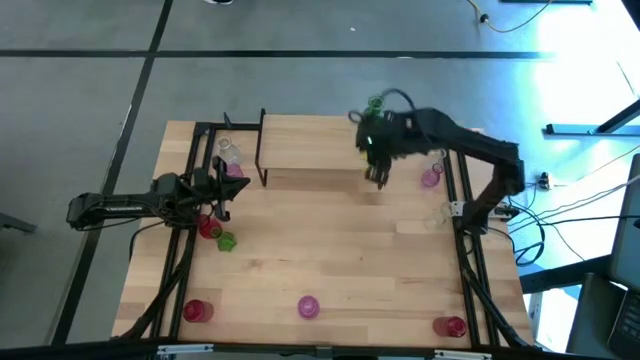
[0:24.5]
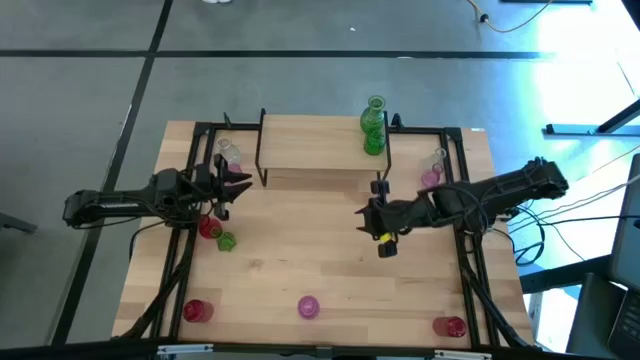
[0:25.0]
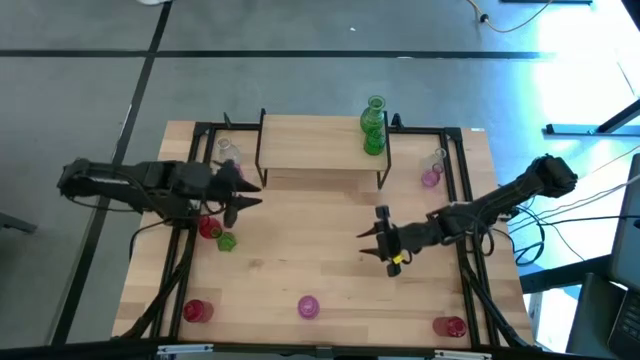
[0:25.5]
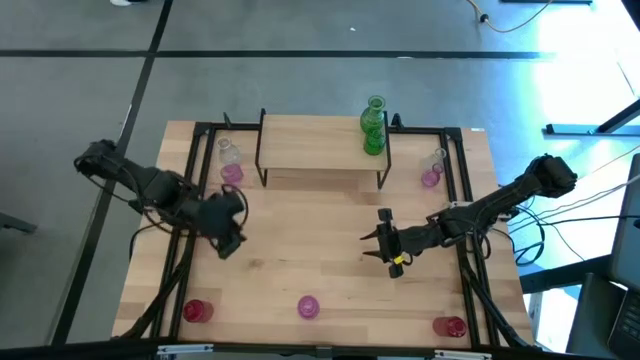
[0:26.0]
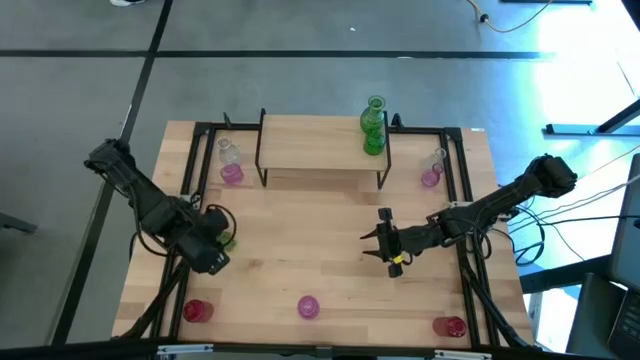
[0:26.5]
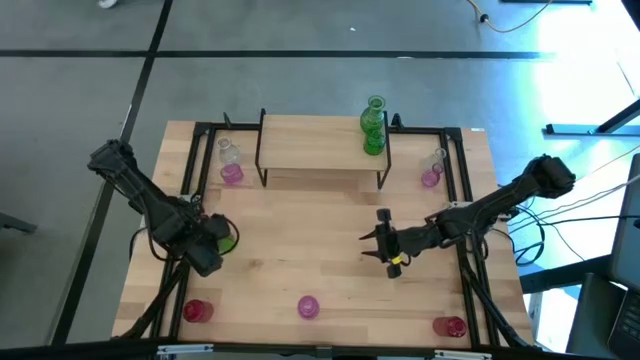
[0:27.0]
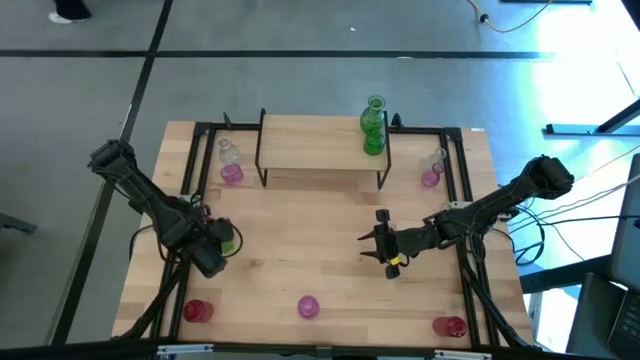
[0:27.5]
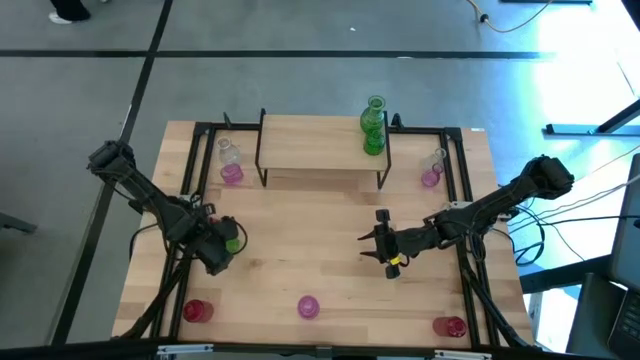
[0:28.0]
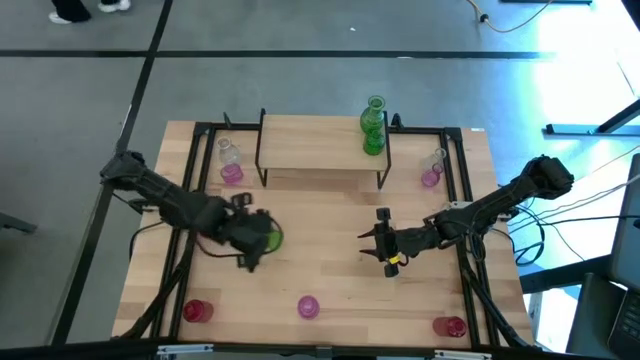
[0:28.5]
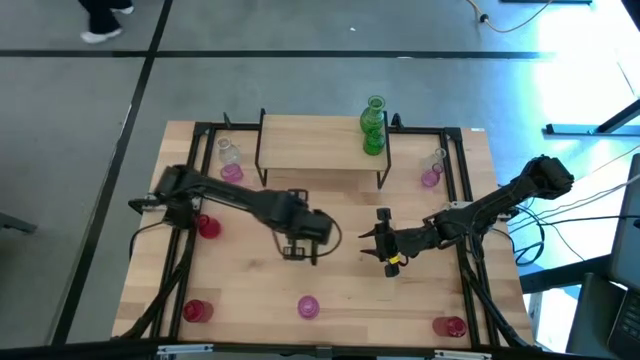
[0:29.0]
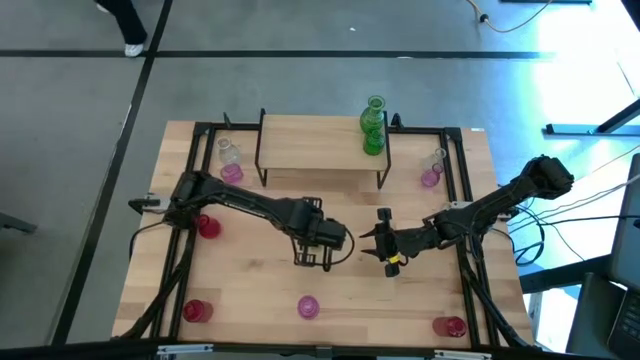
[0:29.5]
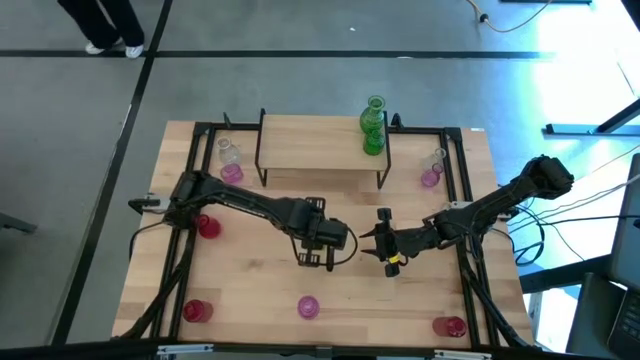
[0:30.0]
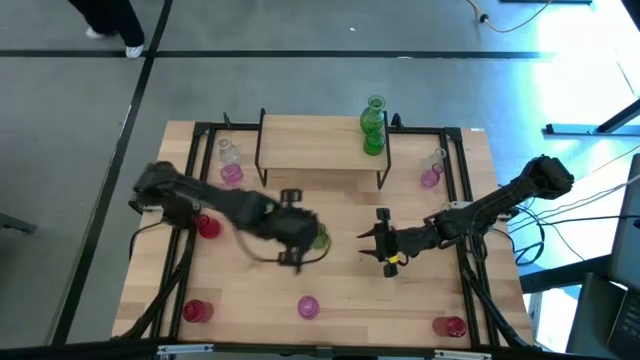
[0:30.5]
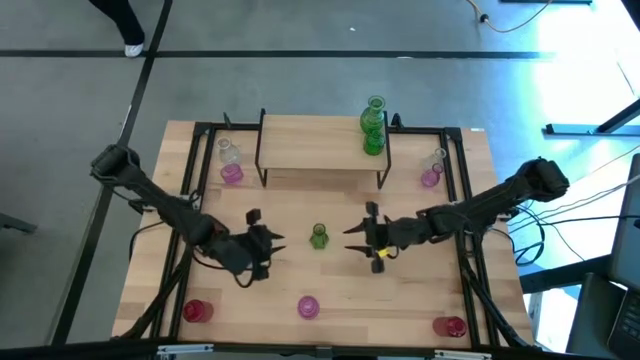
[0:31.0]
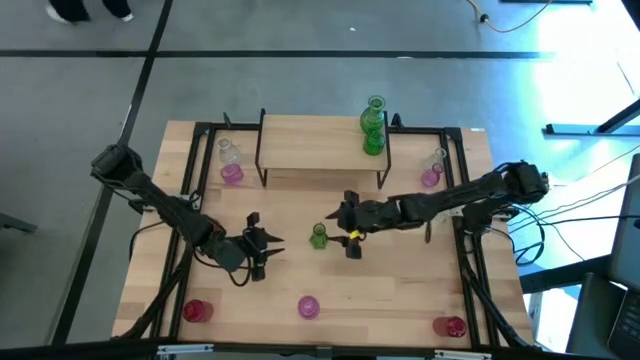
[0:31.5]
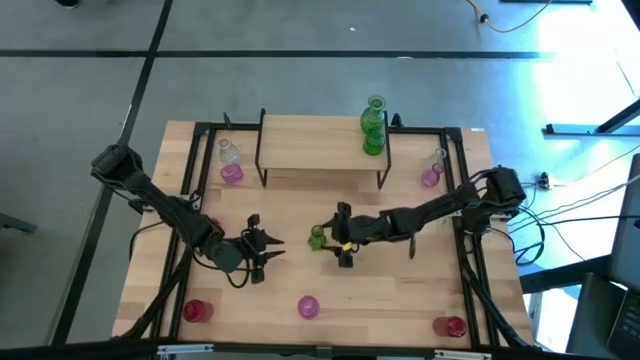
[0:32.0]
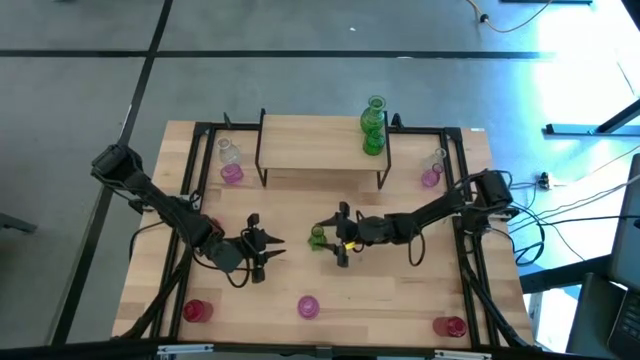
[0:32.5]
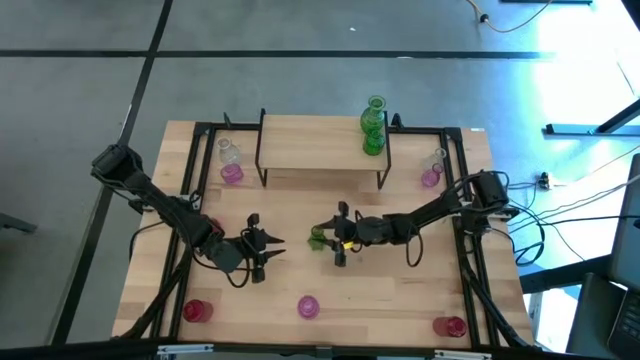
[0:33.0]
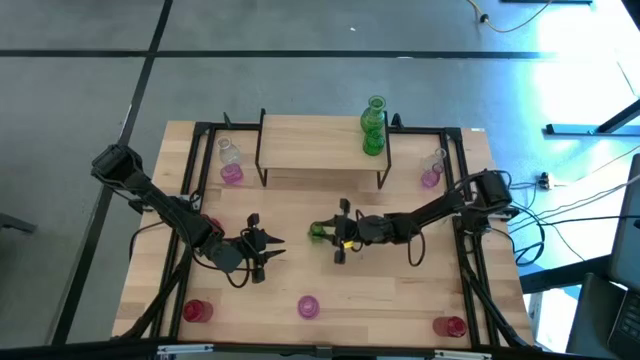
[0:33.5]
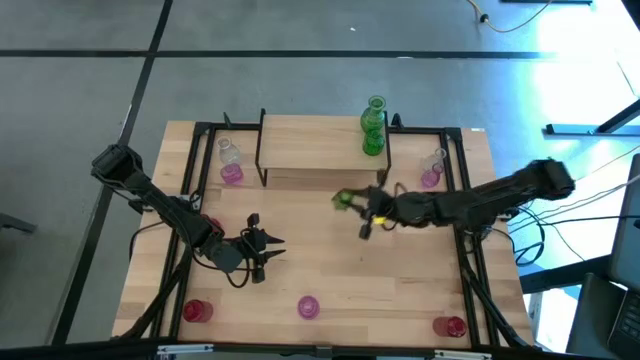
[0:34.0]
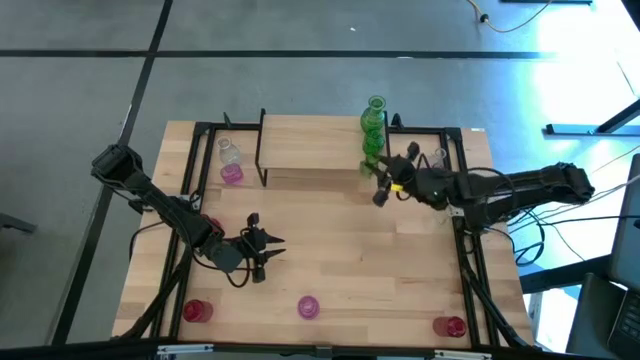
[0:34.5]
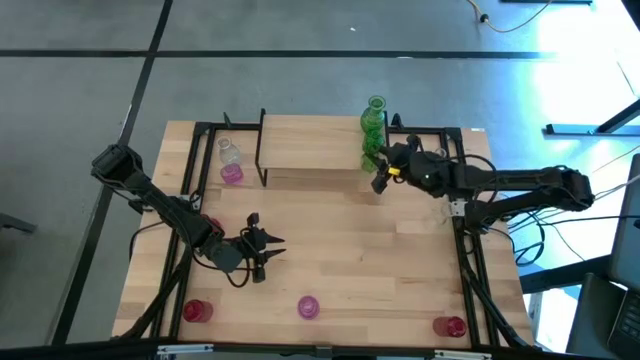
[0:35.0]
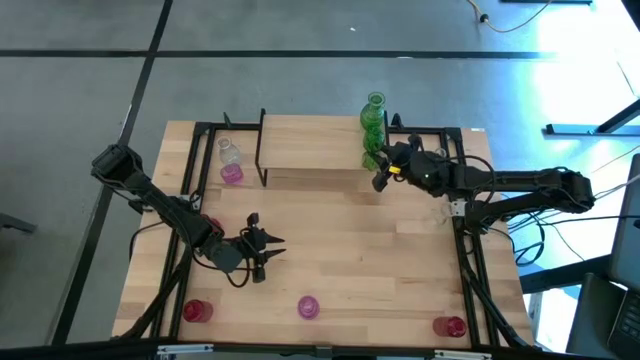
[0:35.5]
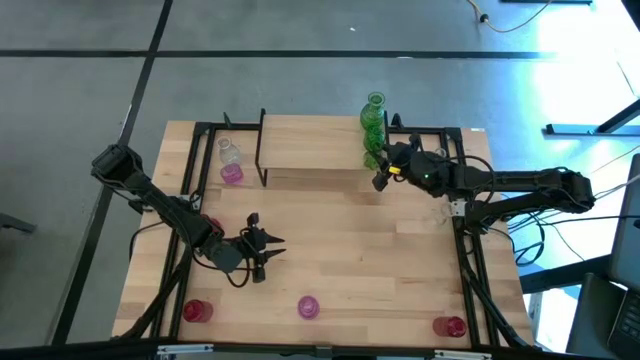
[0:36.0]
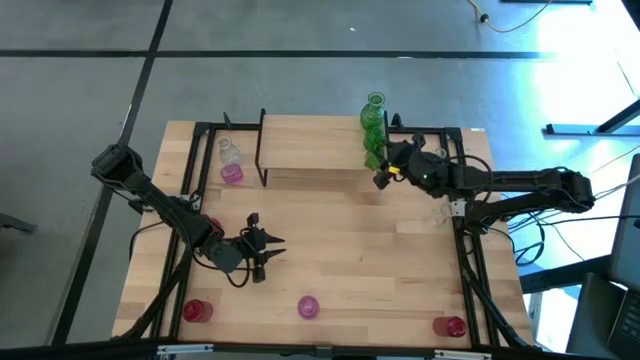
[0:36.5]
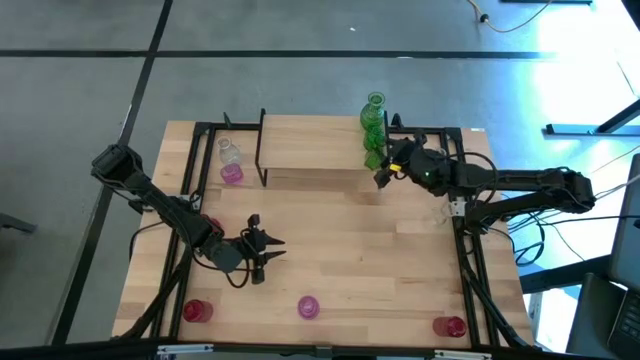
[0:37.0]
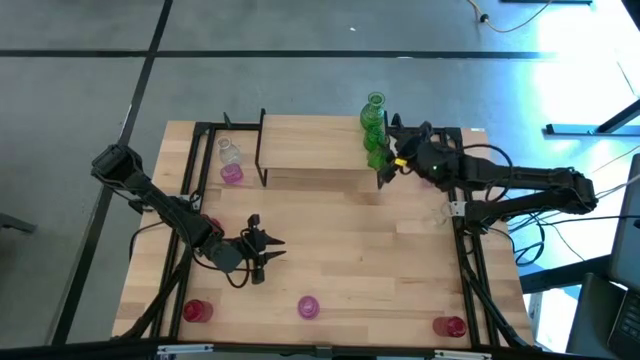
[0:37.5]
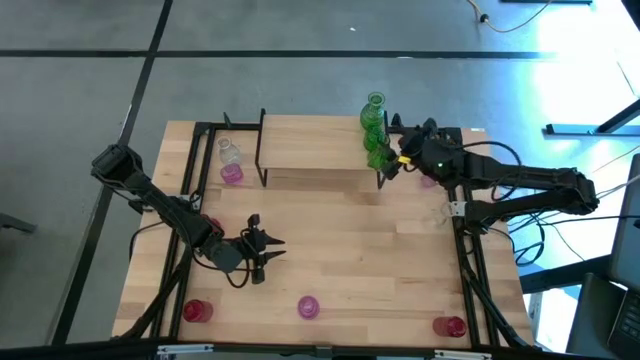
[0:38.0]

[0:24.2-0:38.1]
Task: sort vases onto shelf
Put the green vase on the shelf aligned with the other green vases

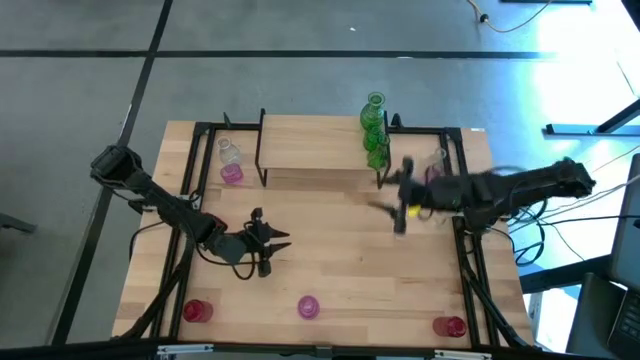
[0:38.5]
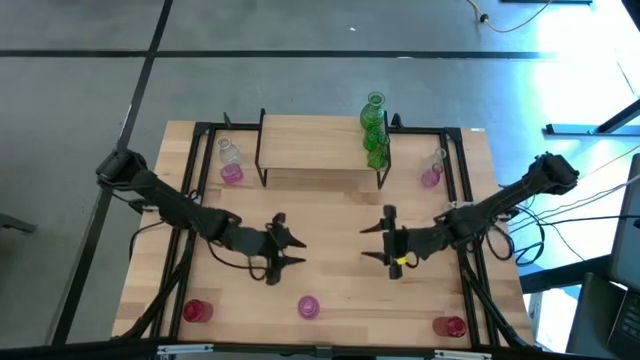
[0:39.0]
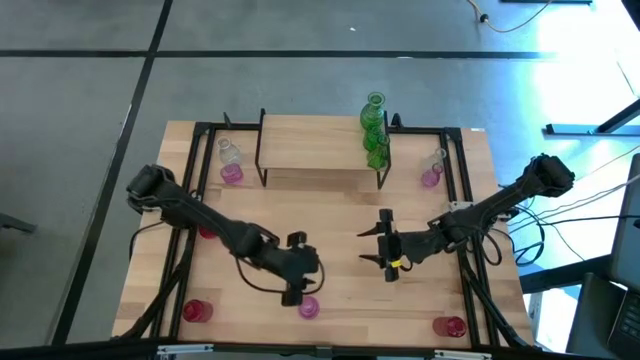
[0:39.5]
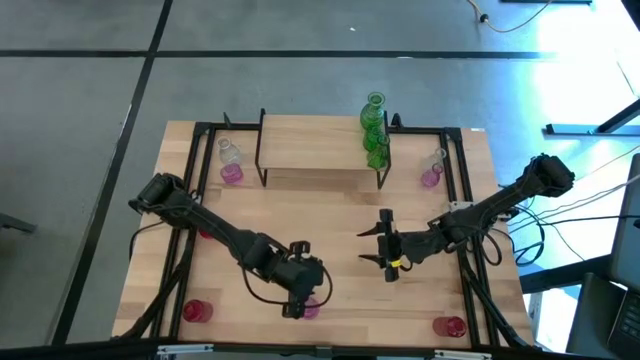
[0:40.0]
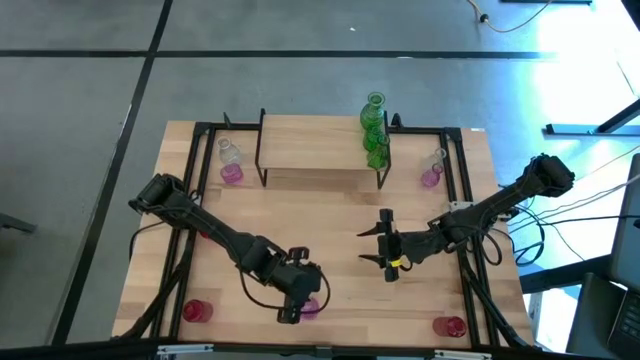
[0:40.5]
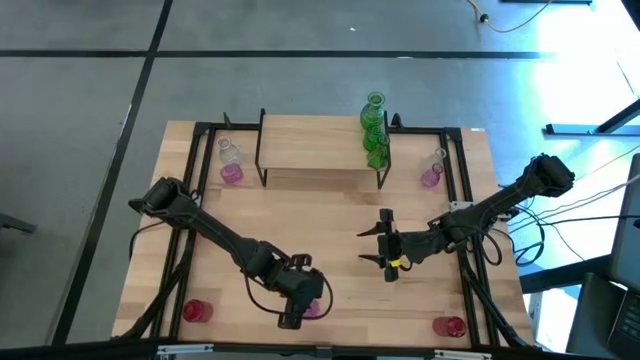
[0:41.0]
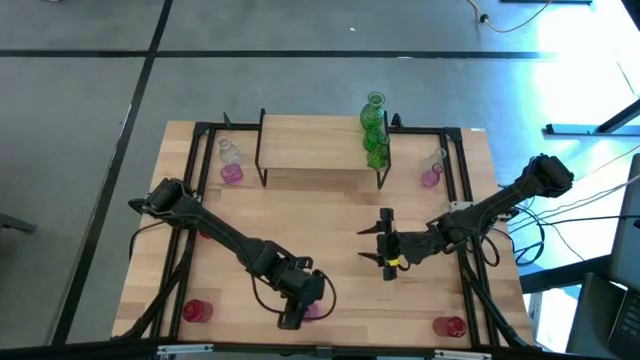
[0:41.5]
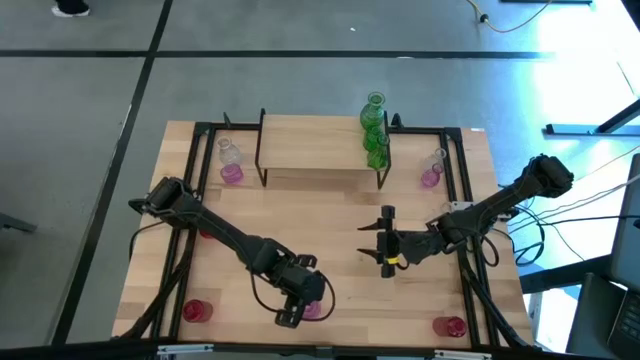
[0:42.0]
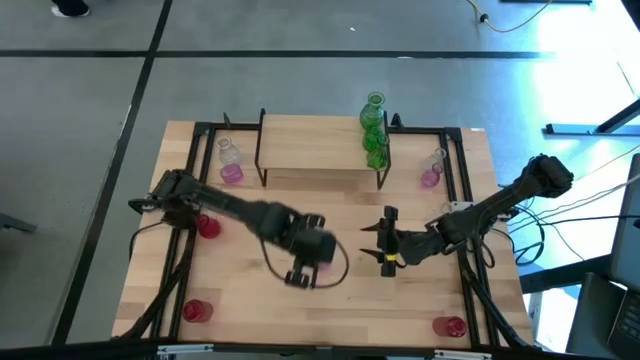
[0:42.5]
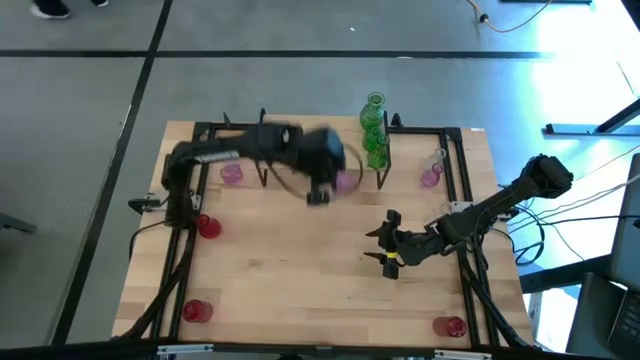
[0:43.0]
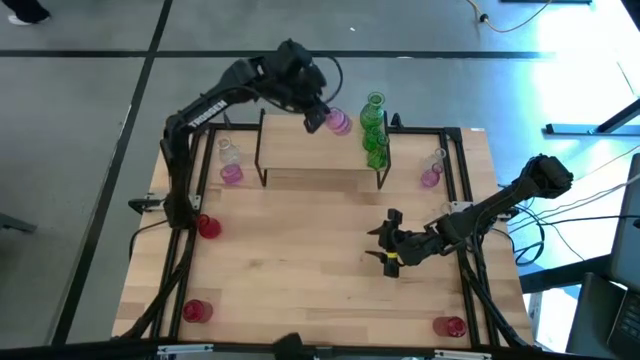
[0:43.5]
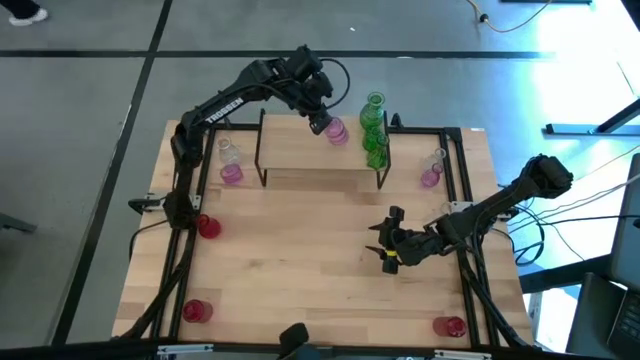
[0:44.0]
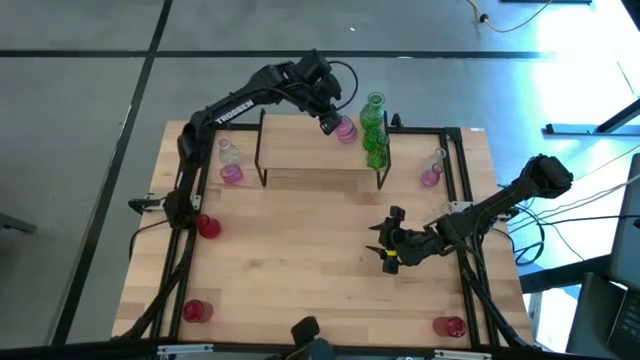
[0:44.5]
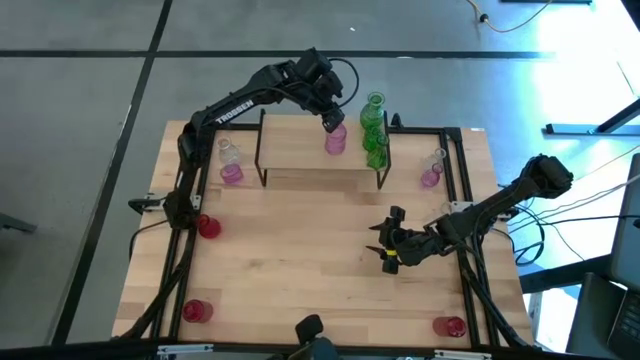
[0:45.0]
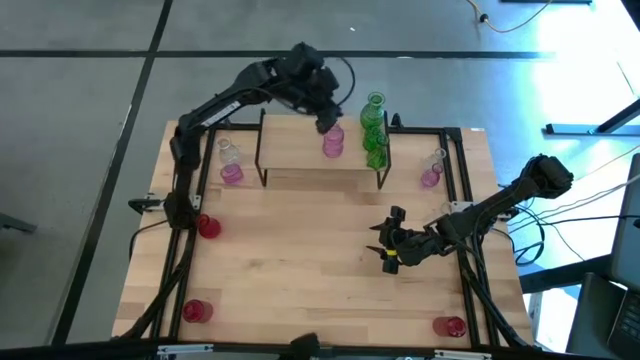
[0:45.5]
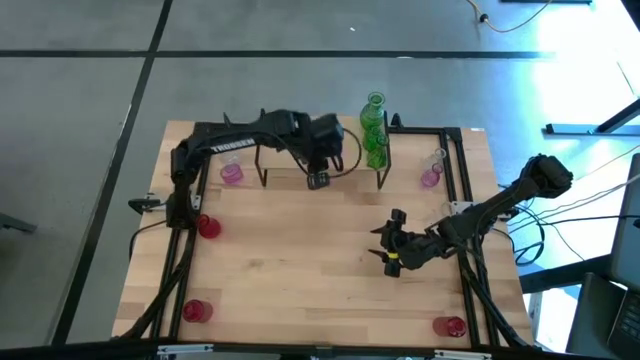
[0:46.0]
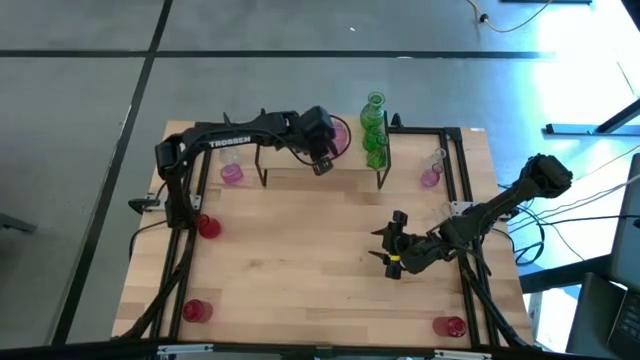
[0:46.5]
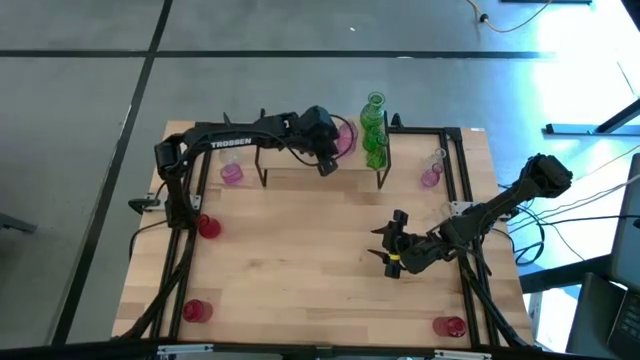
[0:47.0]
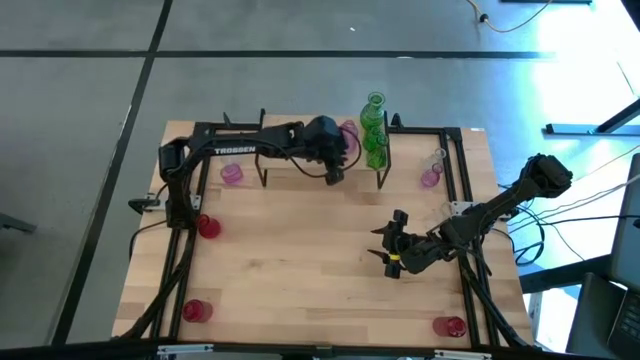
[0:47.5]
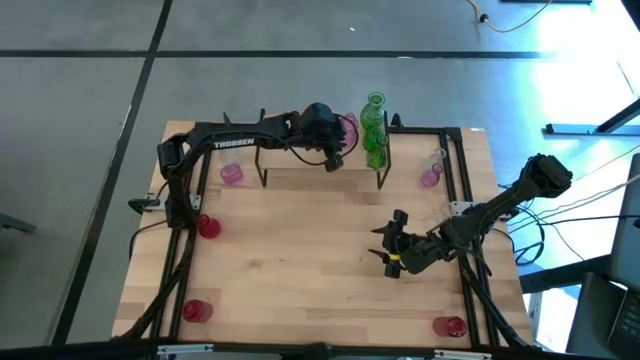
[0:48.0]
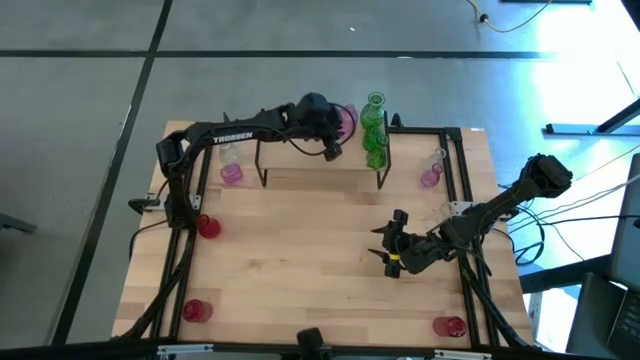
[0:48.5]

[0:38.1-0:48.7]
Put the bottom pink vase on the shelf
